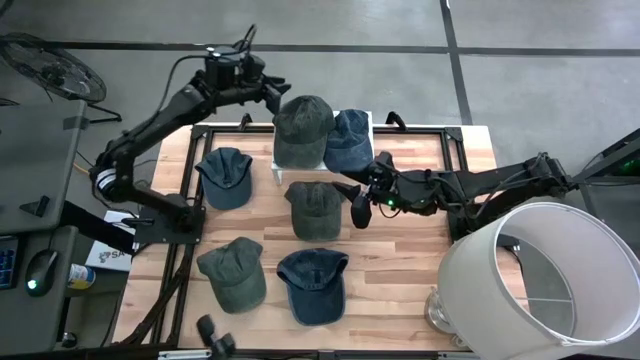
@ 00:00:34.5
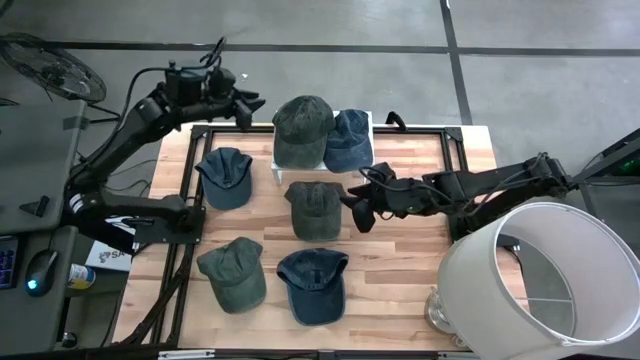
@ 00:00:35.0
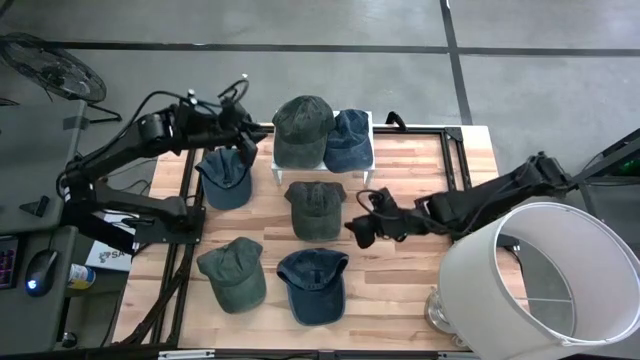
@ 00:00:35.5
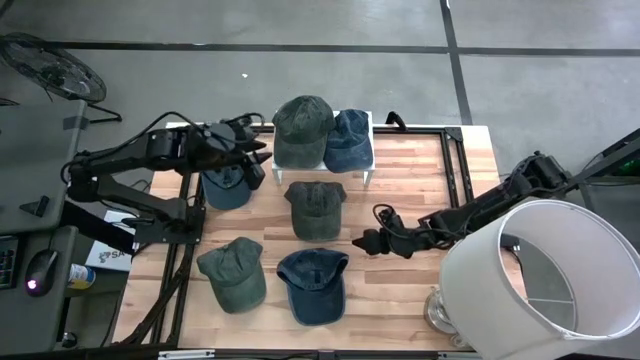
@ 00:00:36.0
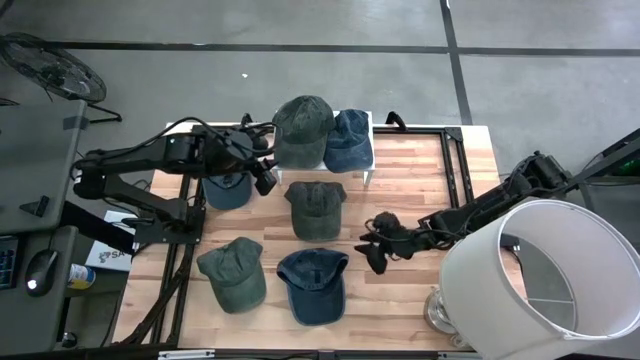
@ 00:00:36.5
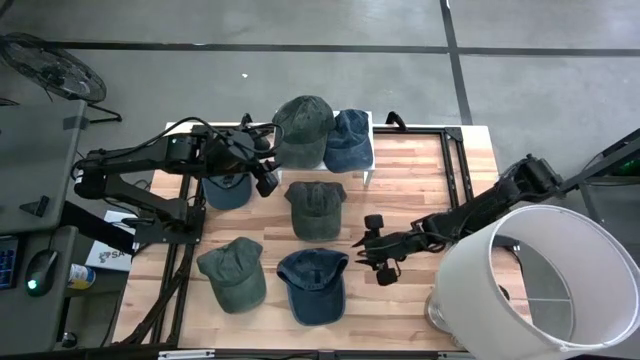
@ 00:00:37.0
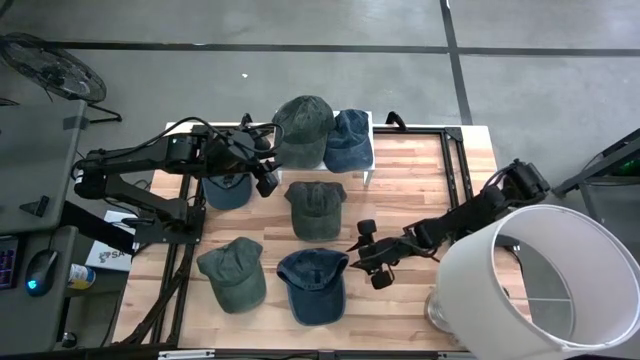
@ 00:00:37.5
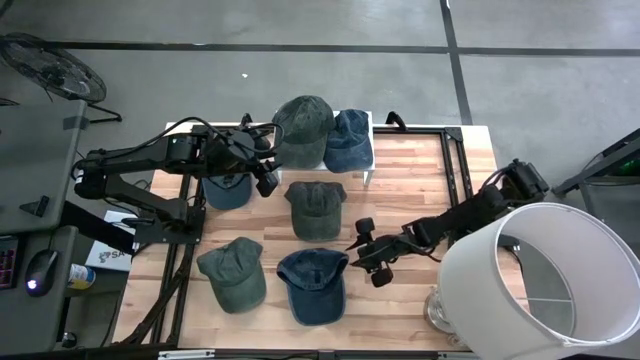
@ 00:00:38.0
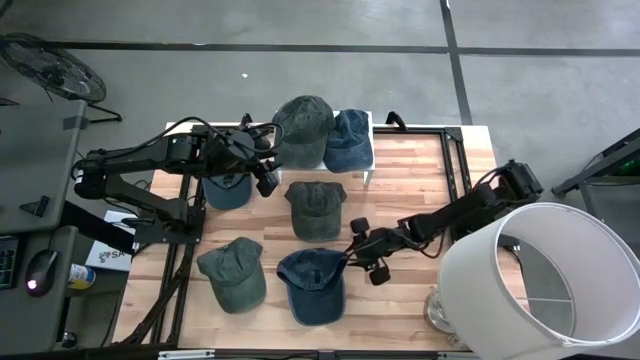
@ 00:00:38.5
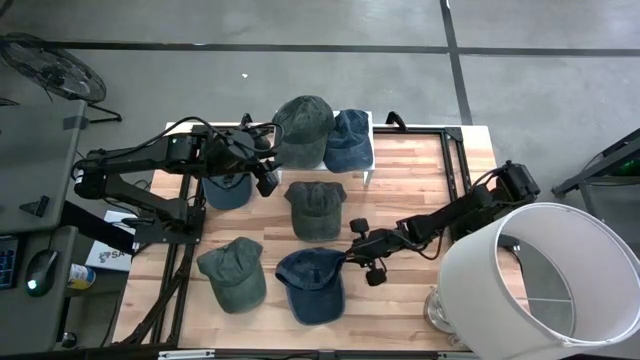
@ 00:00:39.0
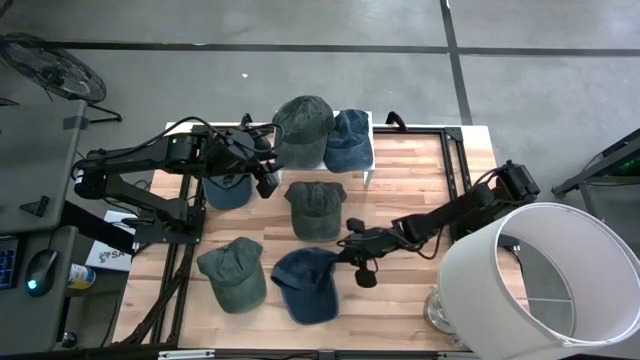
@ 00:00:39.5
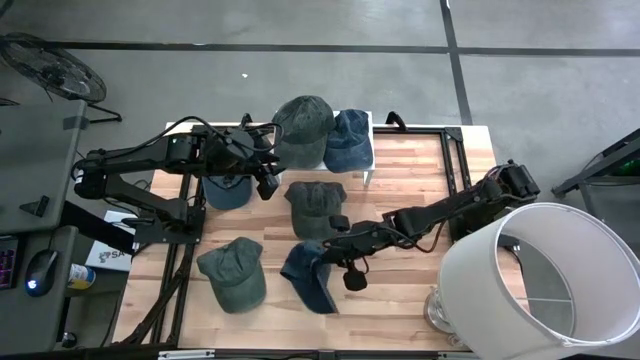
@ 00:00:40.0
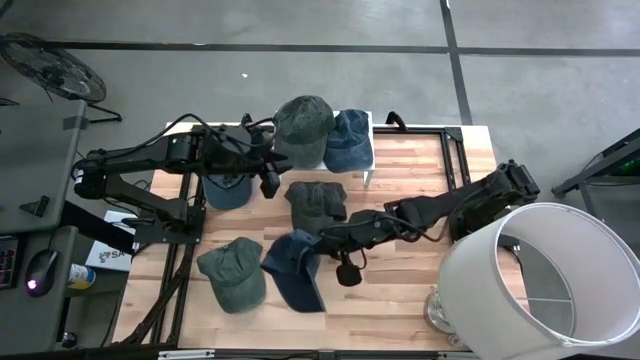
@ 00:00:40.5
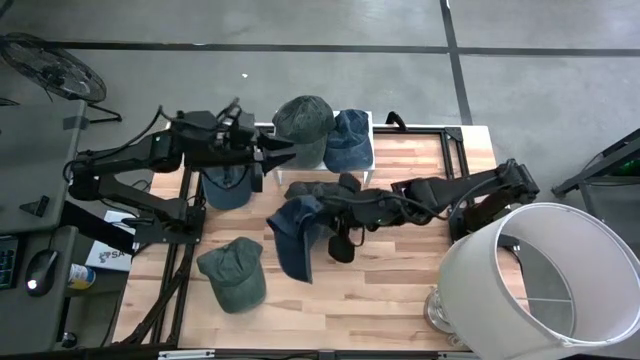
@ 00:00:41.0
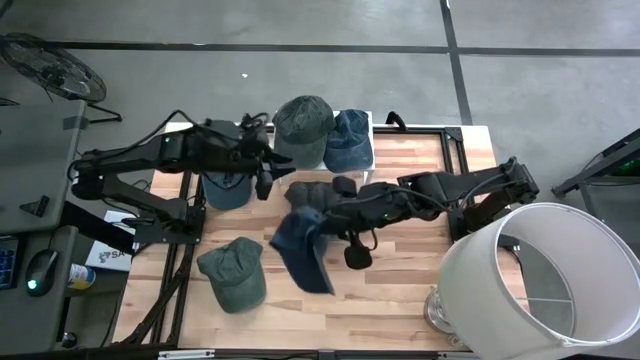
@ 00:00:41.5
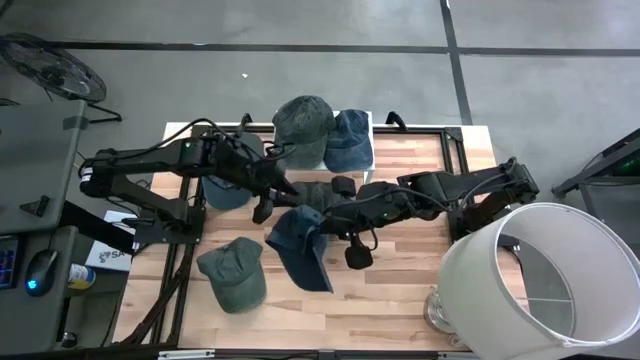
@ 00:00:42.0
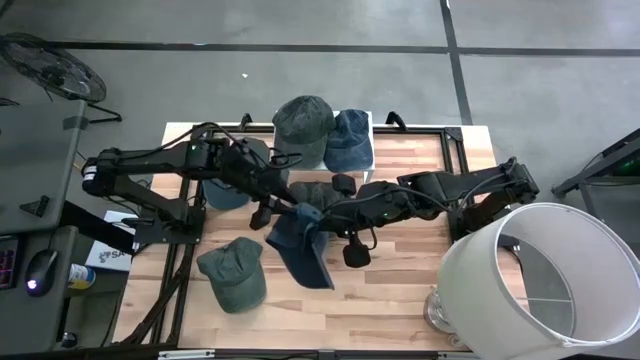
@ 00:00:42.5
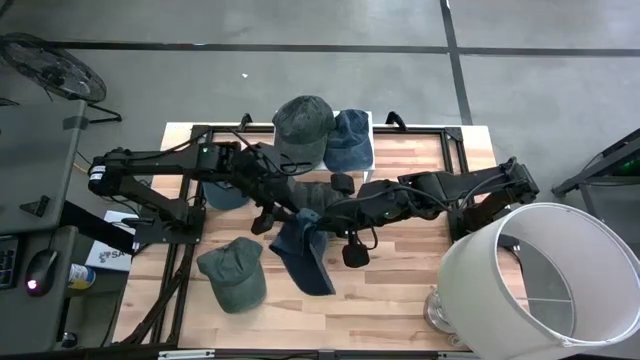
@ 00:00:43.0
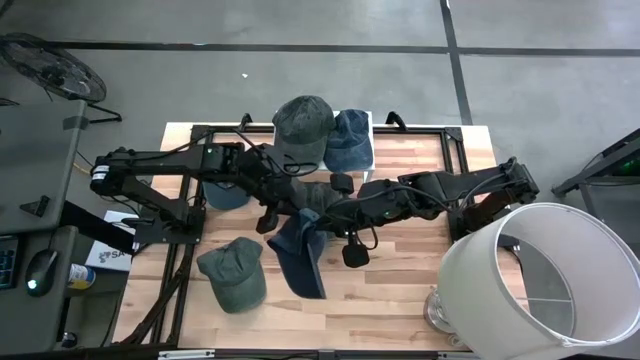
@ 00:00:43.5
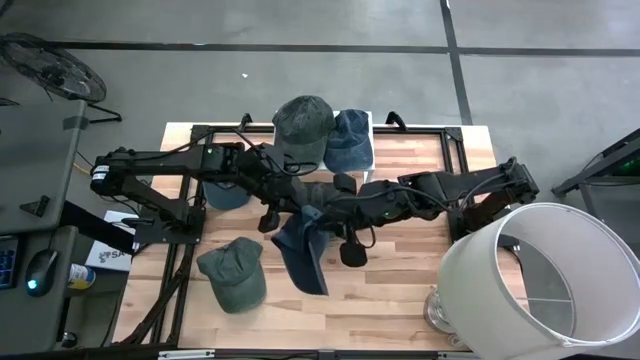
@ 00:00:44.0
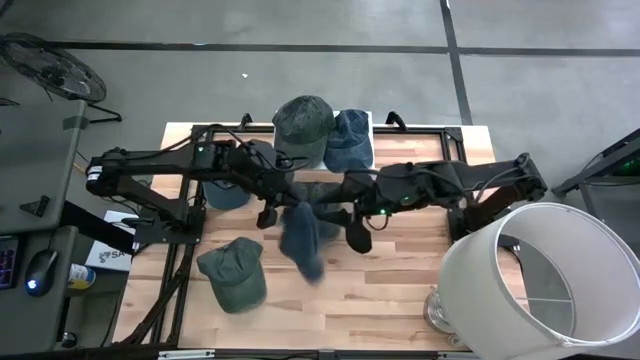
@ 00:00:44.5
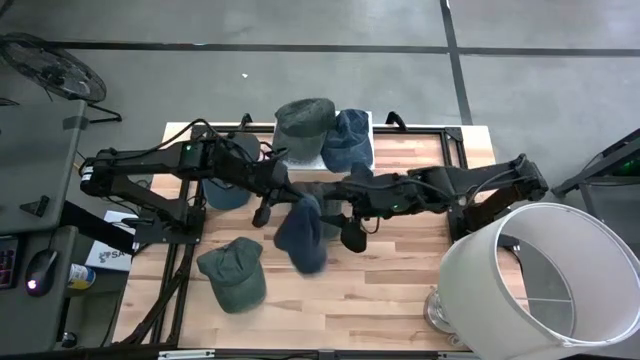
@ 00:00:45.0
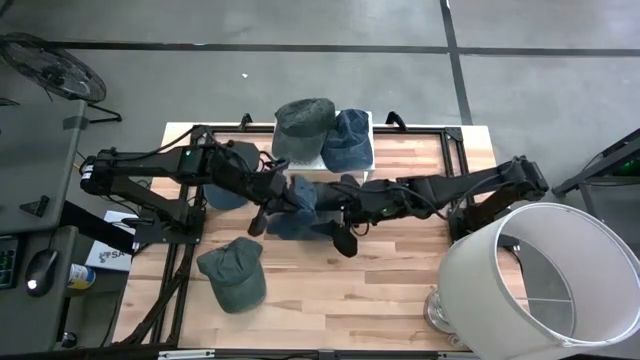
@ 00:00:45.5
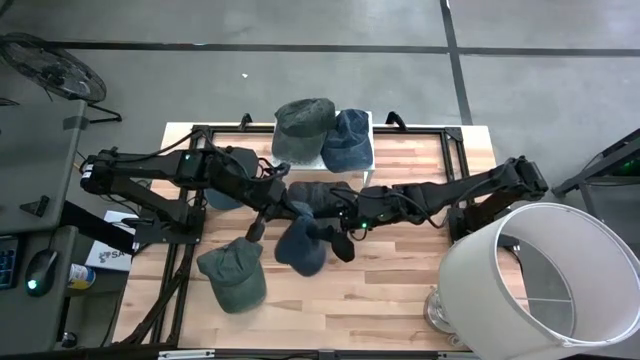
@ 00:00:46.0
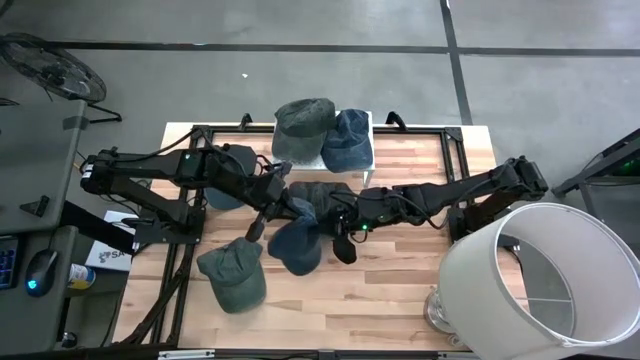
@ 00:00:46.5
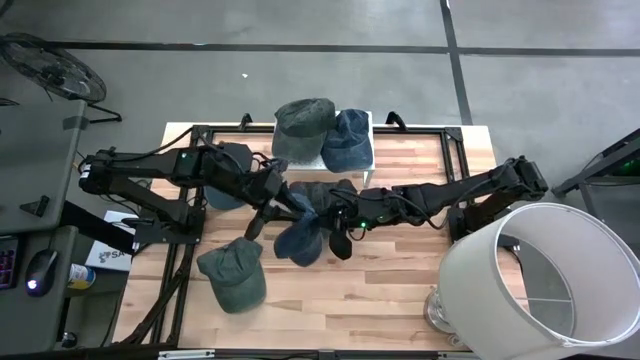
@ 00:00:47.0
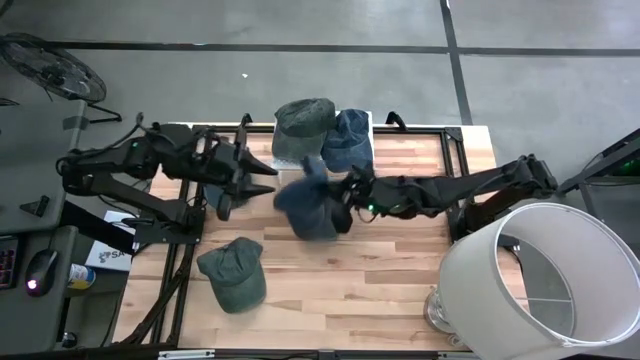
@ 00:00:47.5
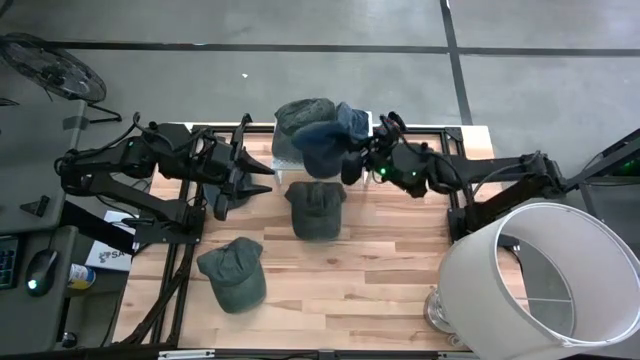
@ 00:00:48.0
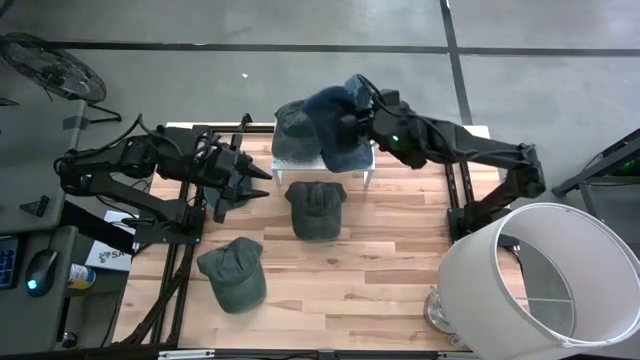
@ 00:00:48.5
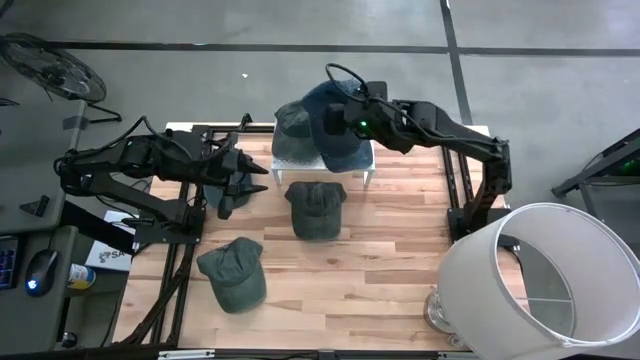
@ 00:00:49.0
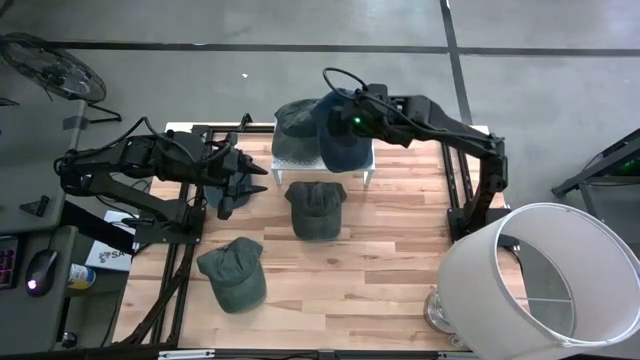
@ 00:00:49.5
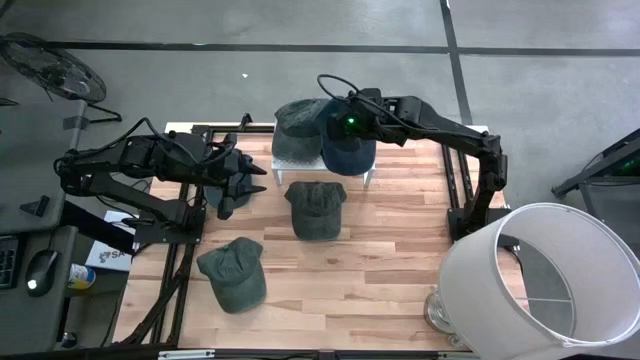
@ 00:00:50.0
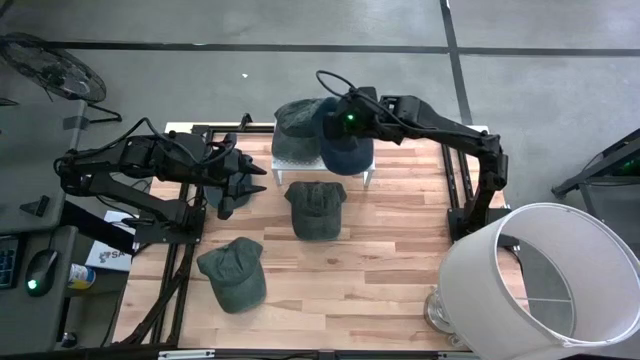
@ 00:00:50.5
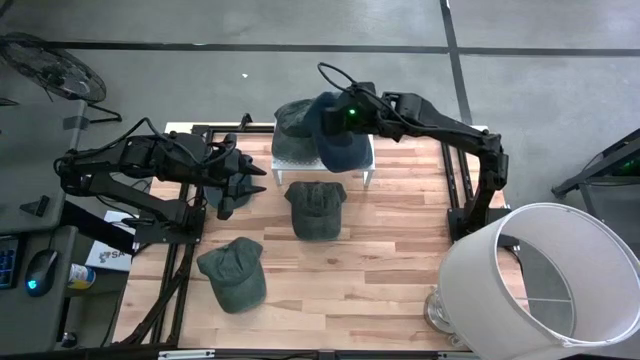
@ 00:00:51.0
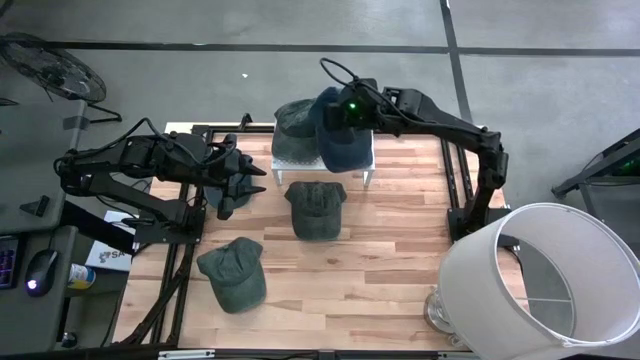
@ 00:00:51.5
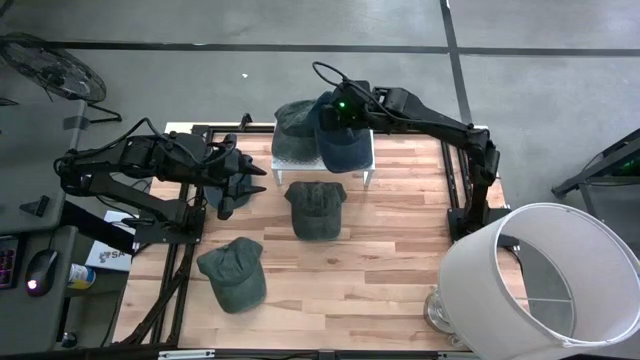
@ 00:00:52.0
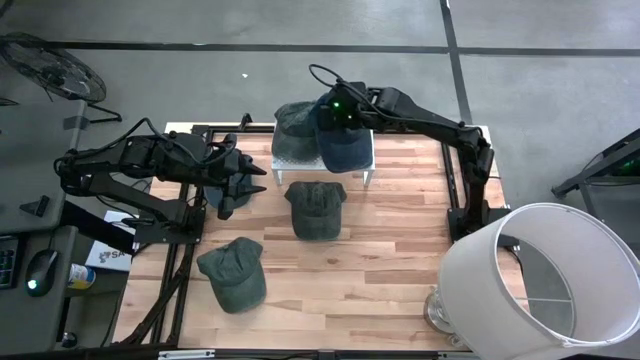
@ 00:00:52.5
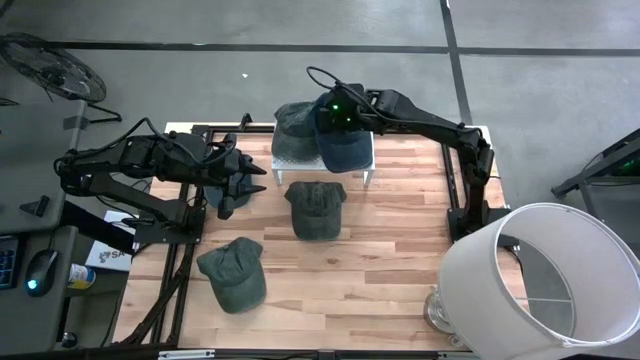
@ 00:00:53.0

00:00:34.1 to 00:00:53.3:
Task: Pick & Place hat
Put the bottom blue cap on the shelf
